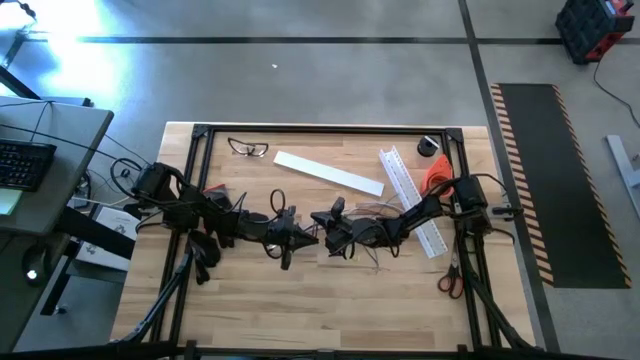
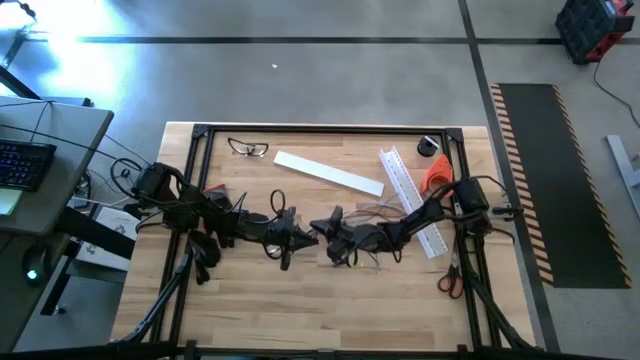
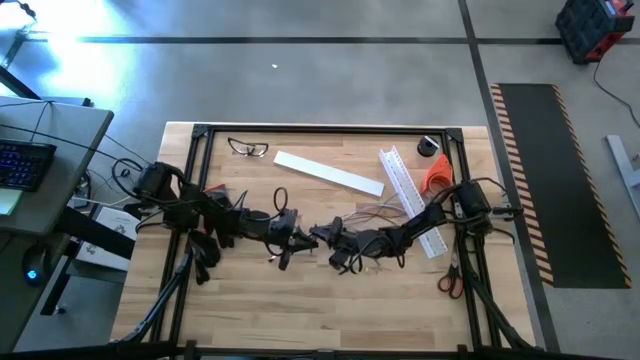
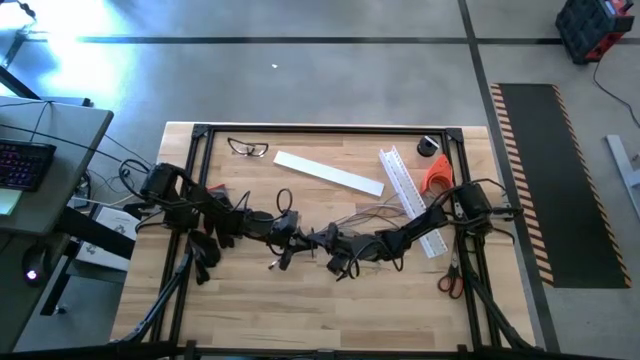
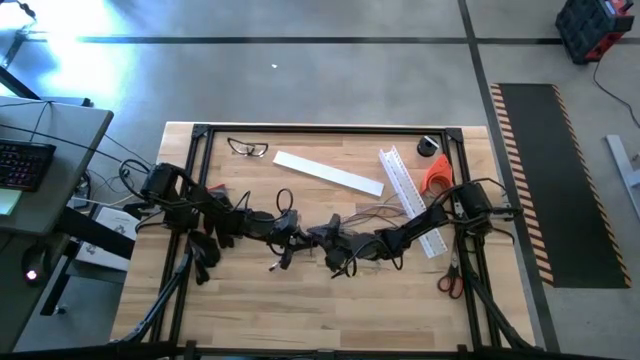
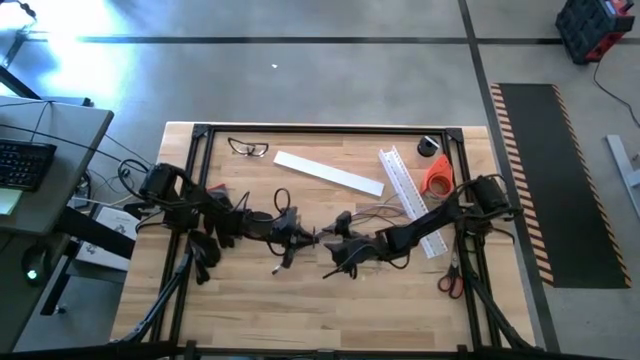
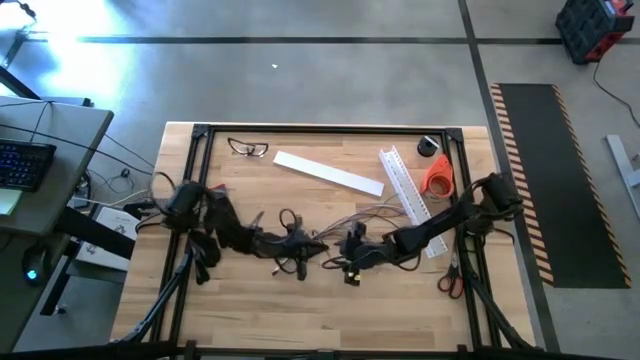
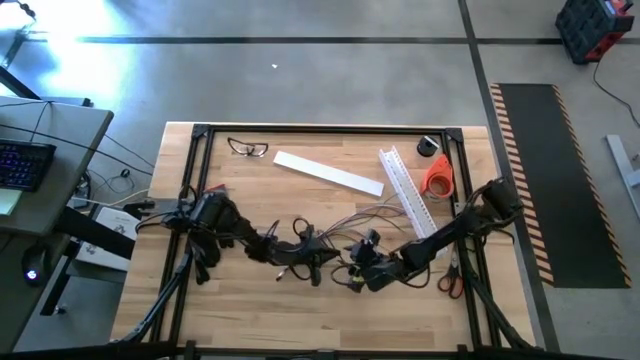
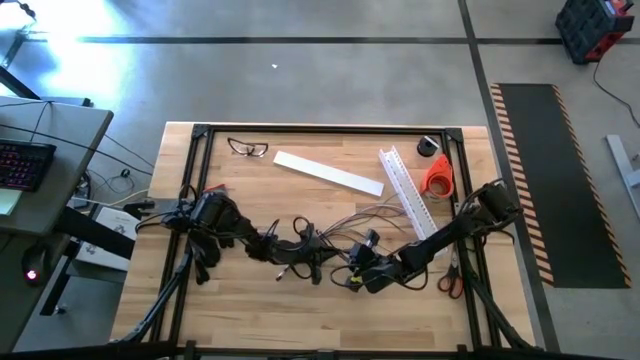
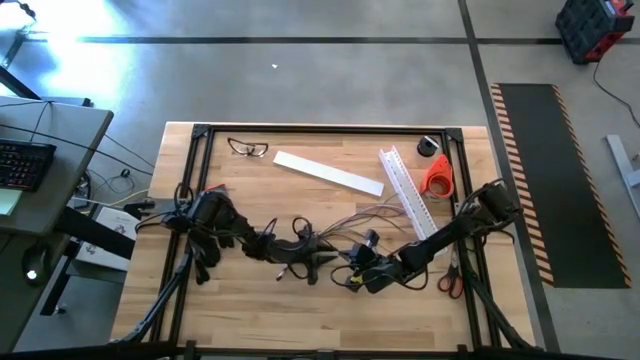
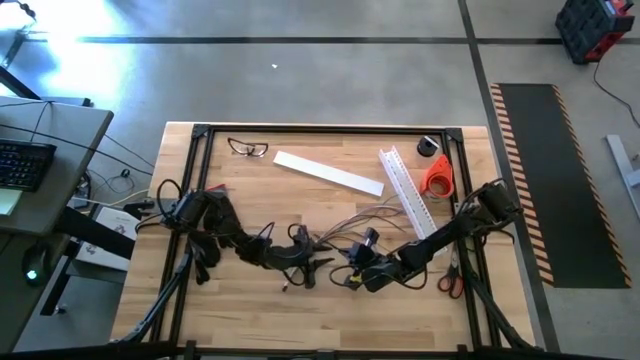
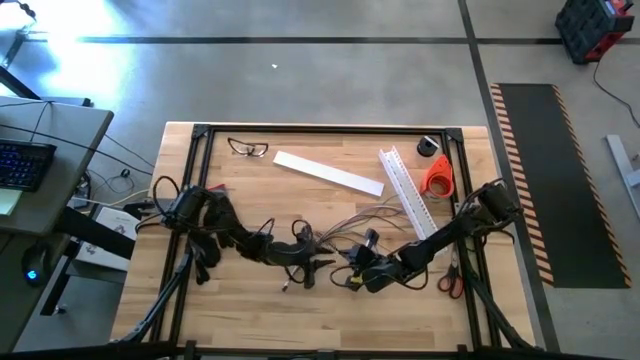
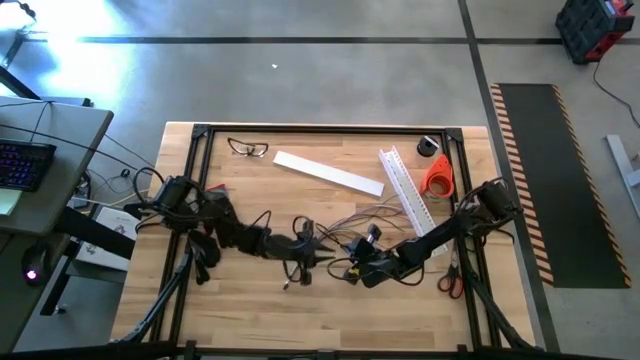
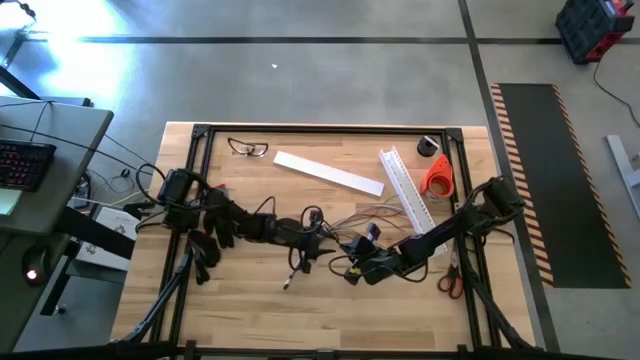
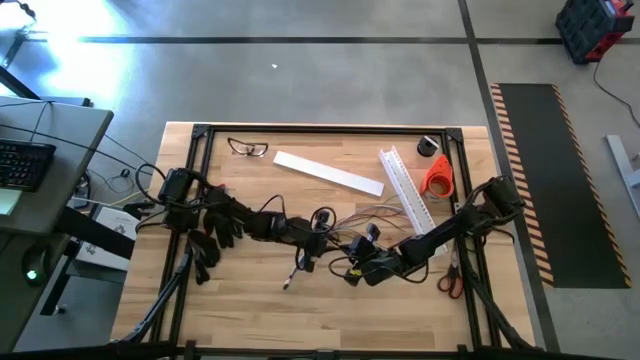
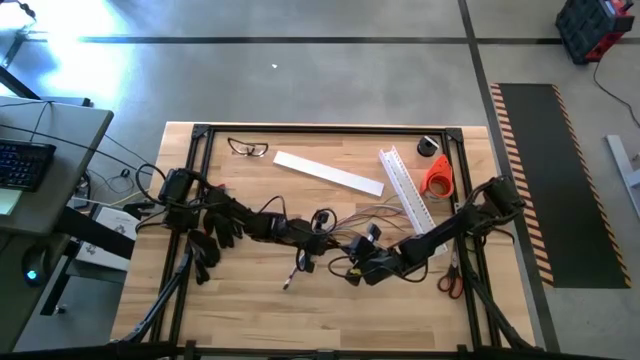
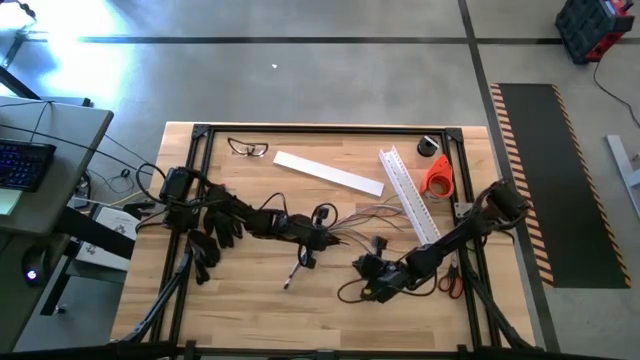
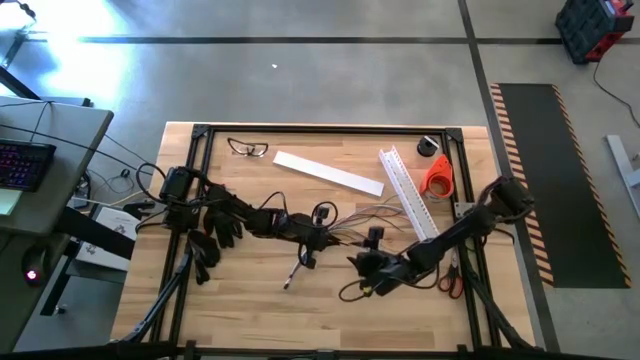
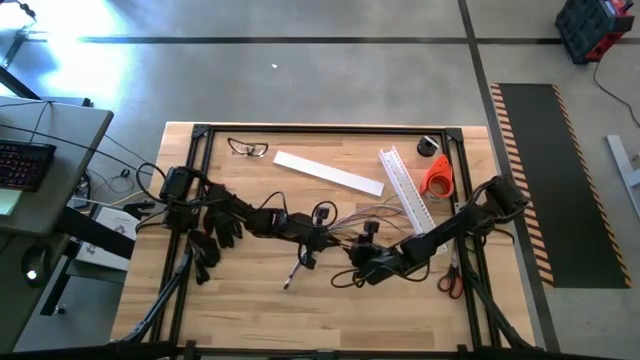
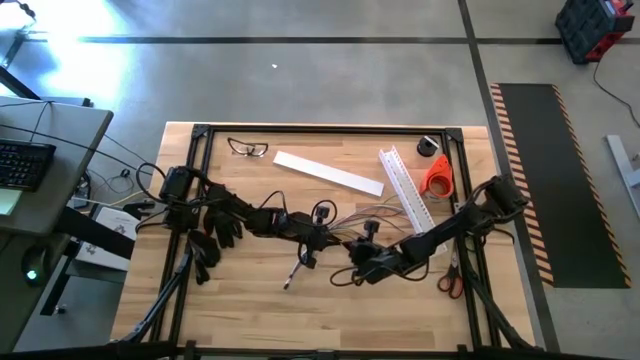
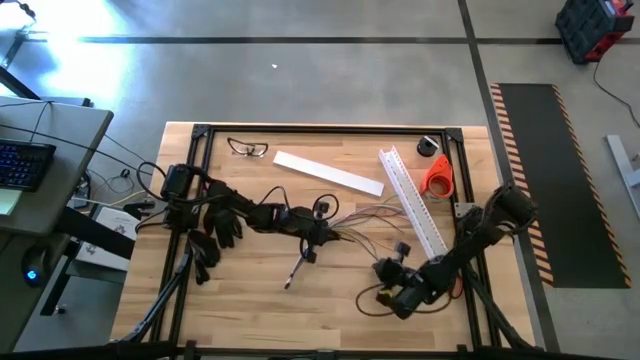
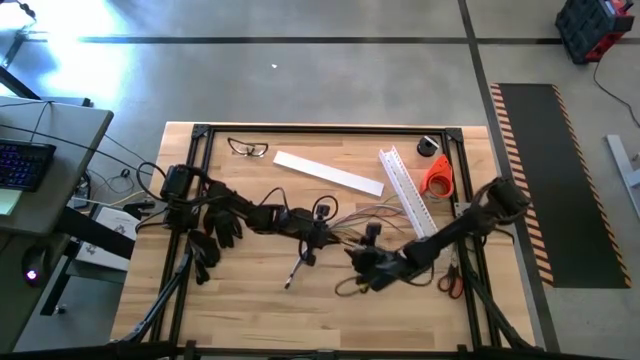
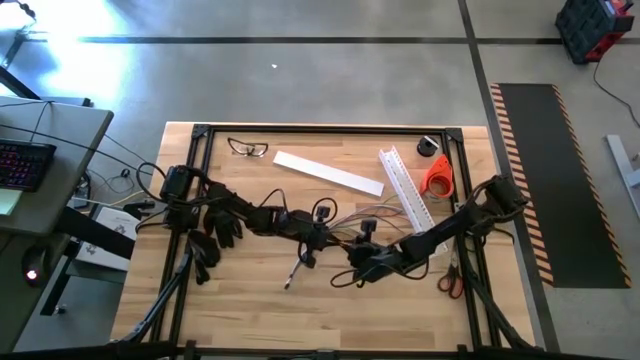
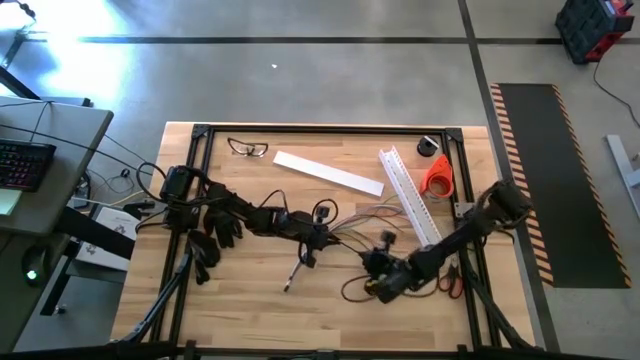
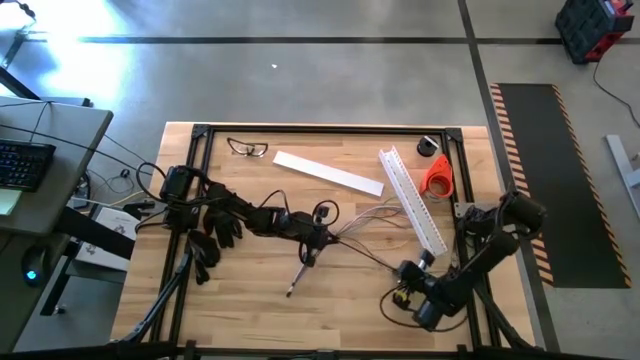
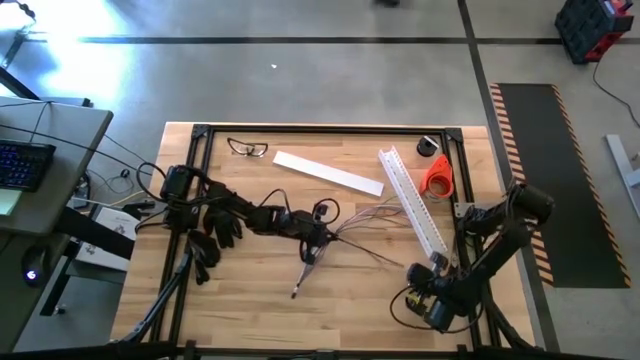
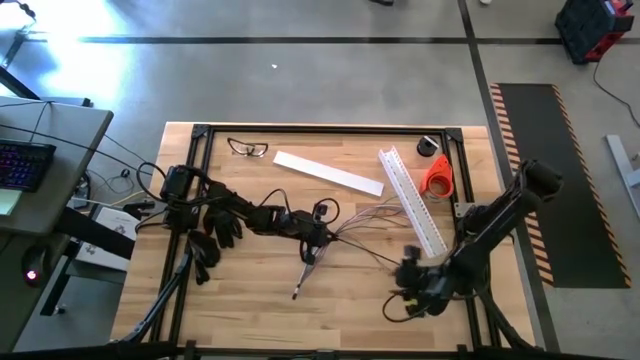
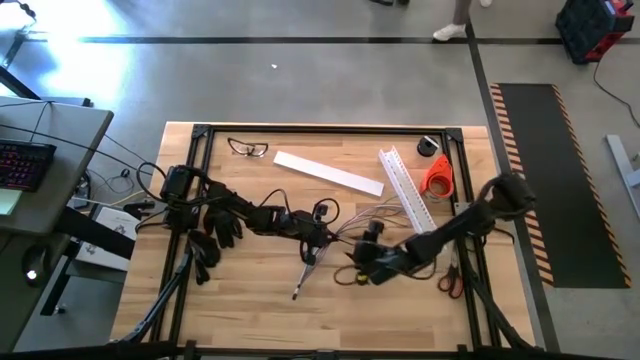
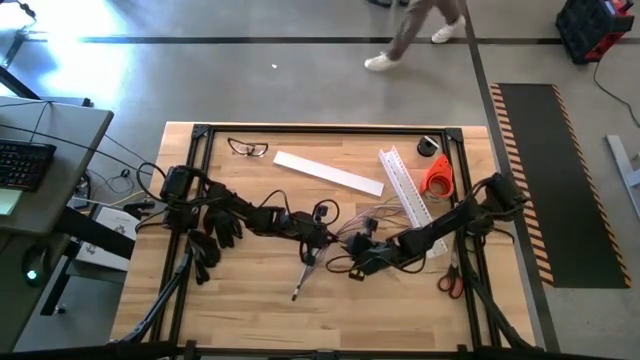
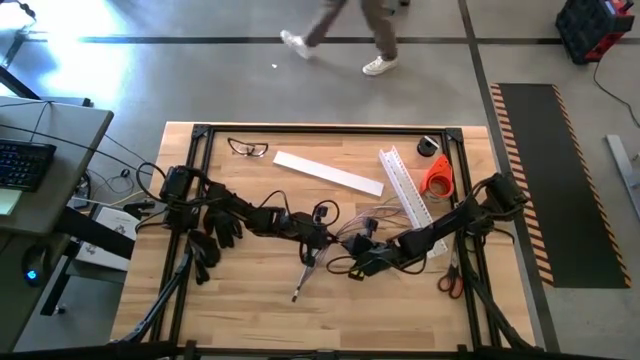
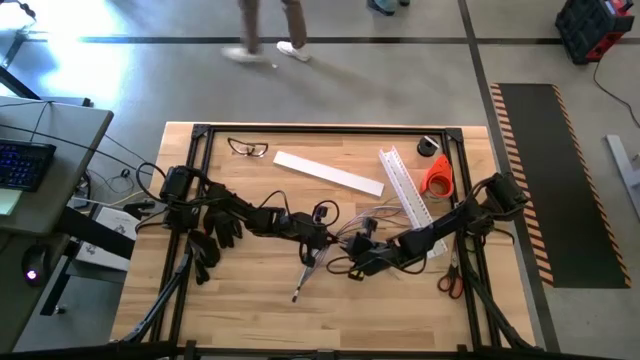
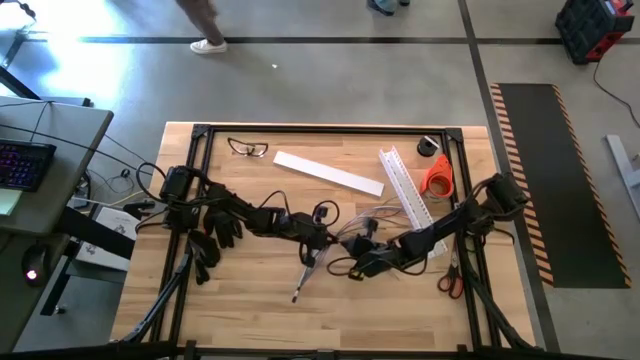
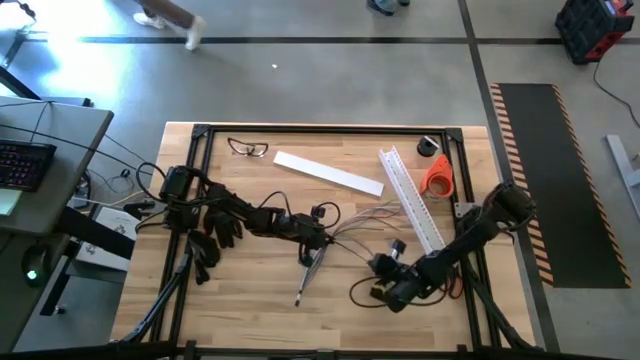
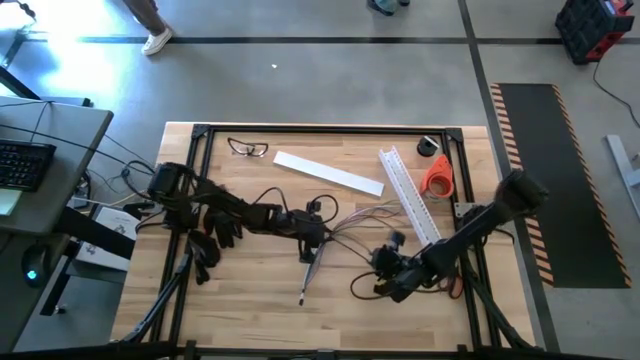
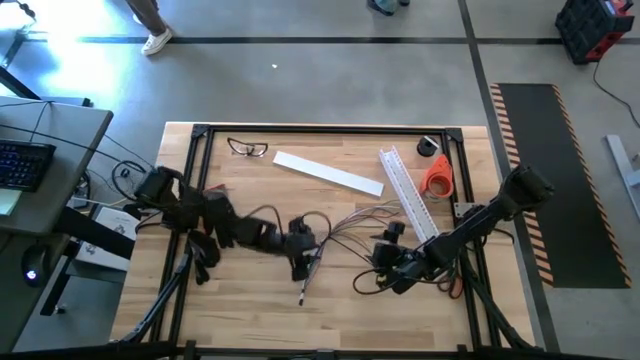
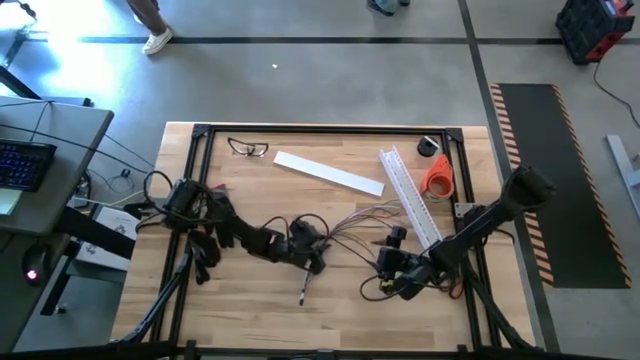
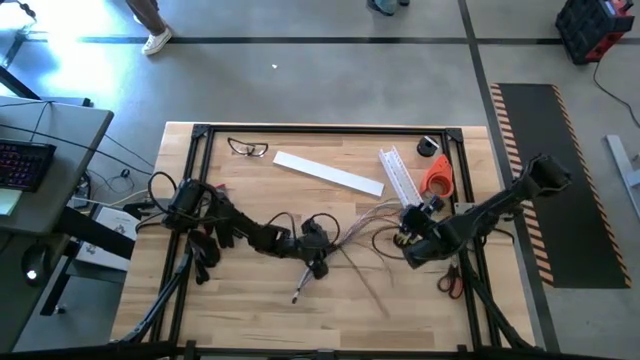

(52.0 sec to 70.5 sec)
Task: Ziptie cables
Wrap the cables using a zip tie
